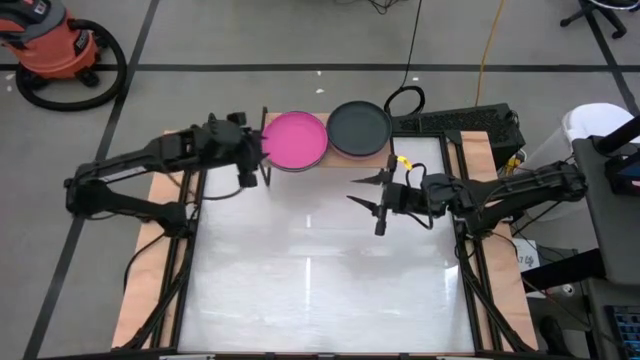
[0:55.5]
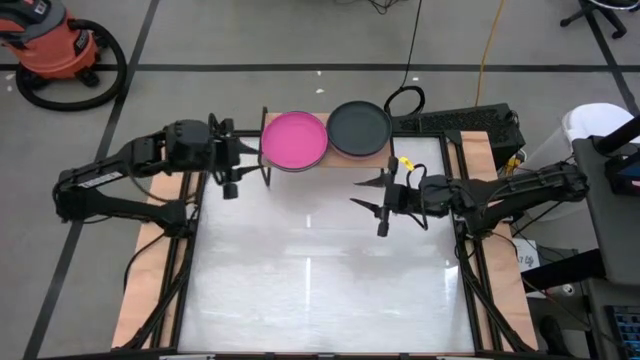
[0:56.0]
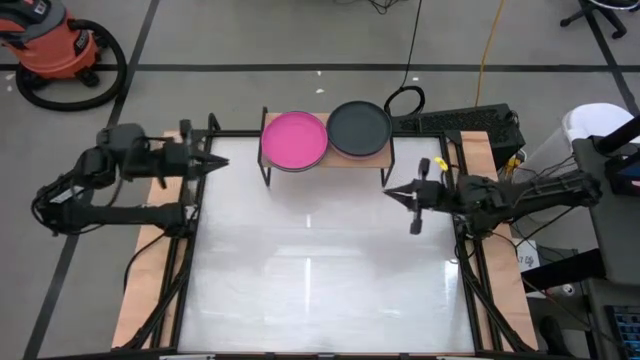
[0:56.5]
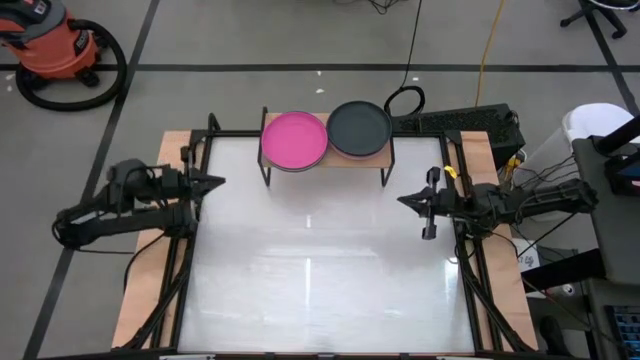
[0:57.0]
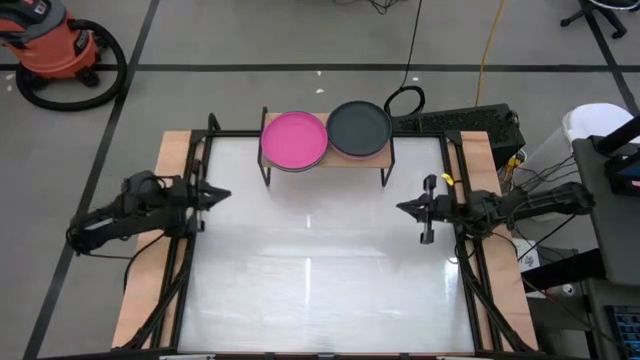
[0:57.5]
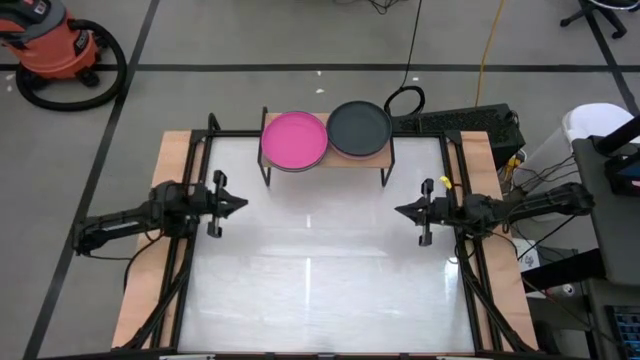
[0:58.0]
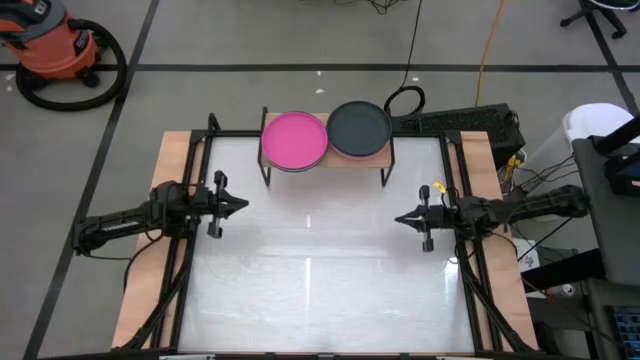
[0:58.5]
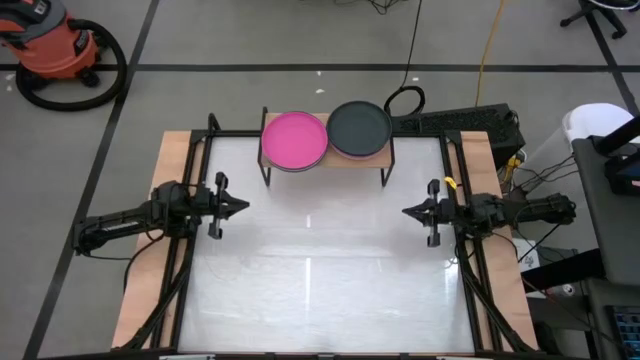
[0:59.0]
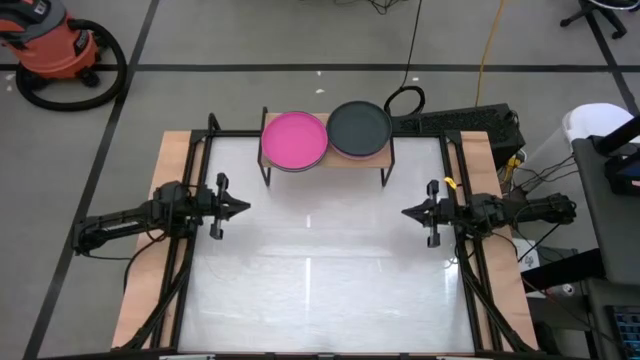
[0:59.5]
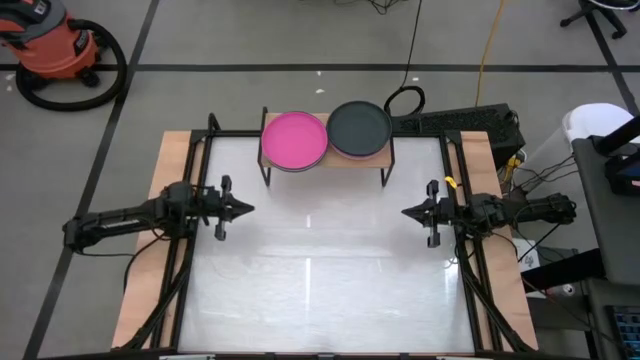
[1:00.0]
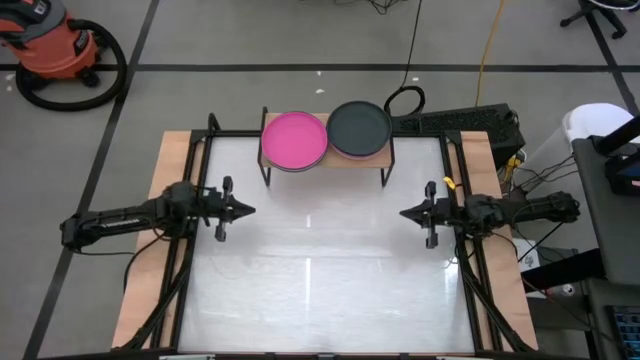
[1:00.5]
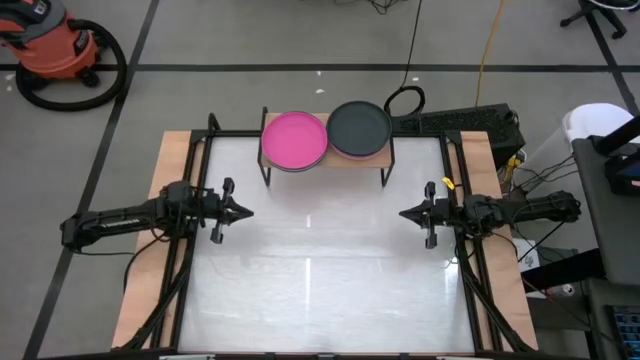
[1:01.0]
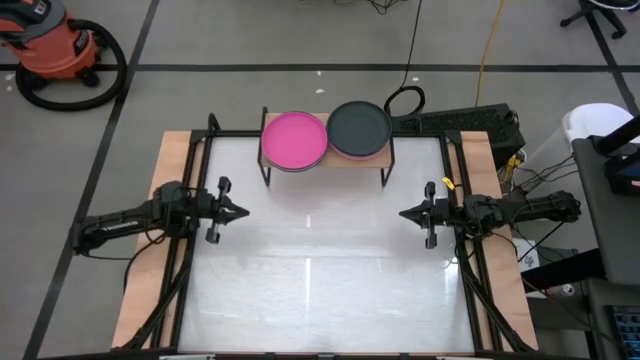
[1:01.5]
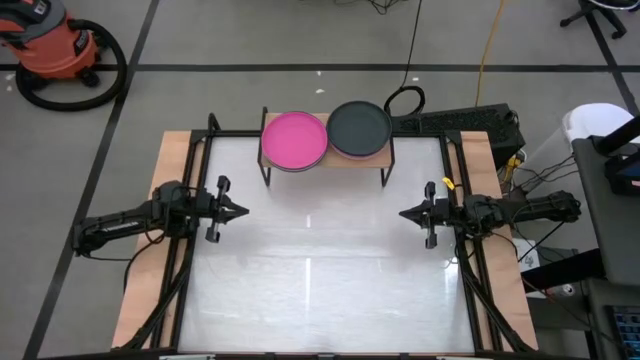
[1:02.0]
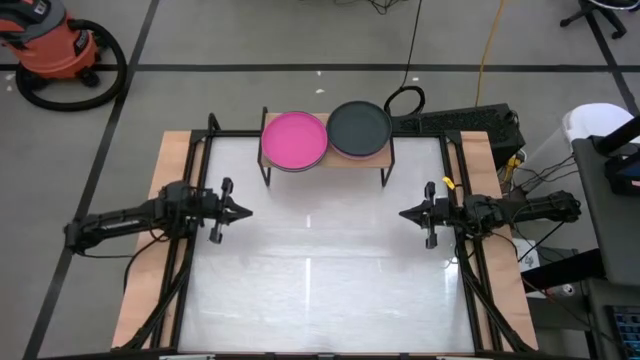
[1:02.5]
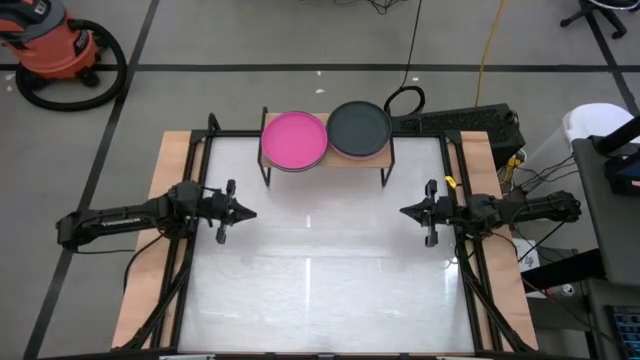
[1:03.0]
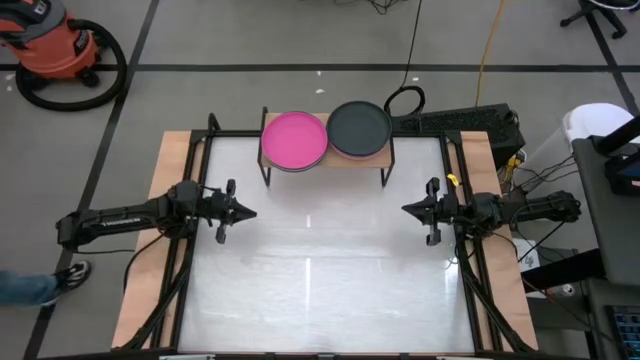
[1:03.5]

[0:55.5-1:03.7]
Task: Place and stack plates onto a shelf
Return to Home Position

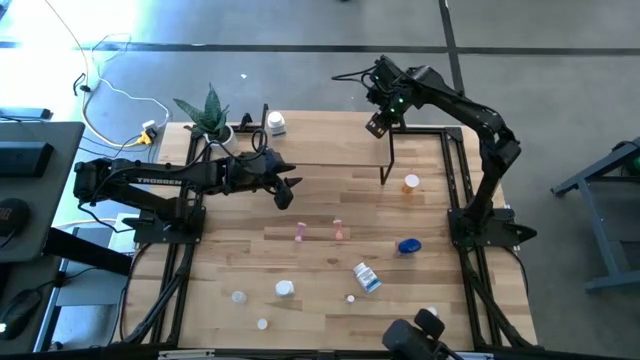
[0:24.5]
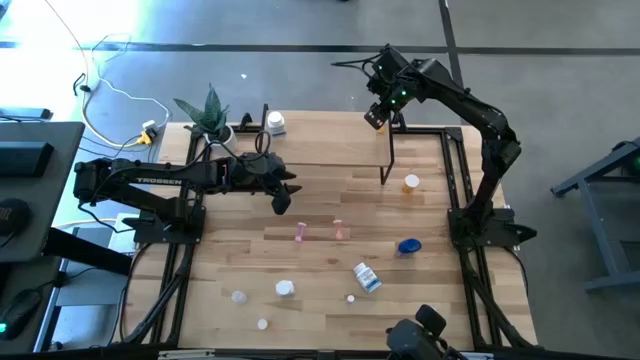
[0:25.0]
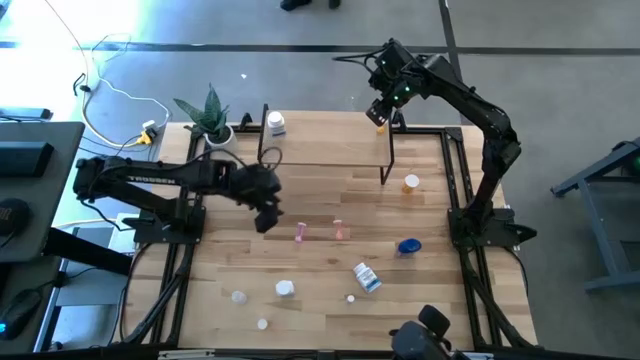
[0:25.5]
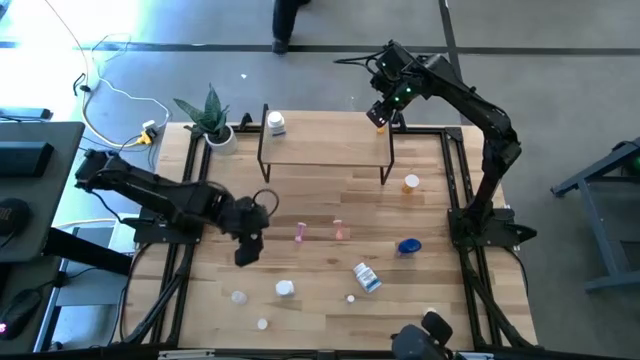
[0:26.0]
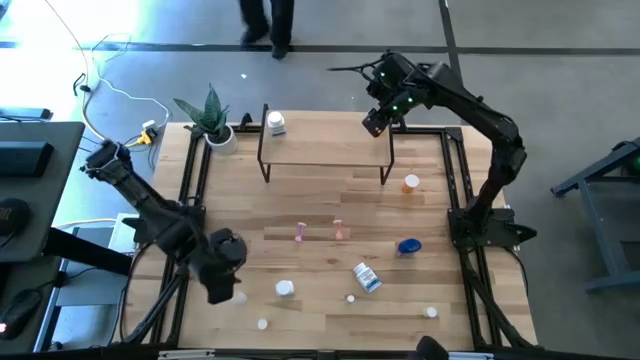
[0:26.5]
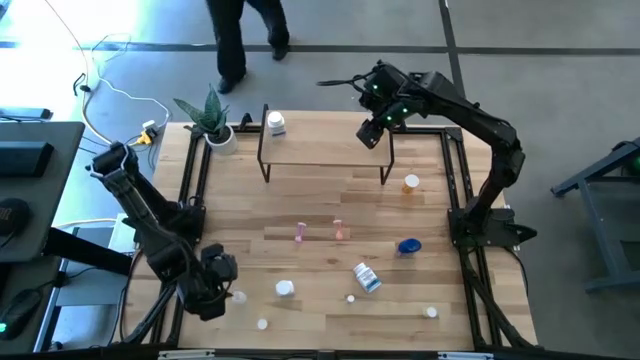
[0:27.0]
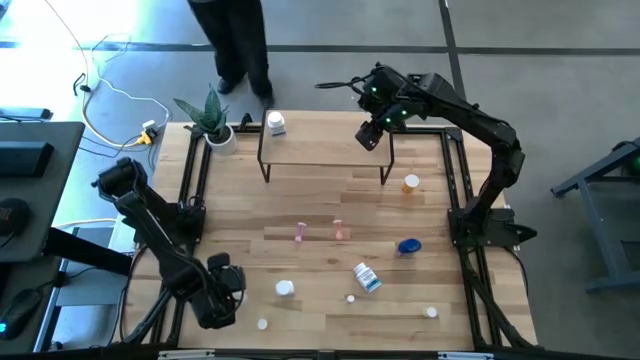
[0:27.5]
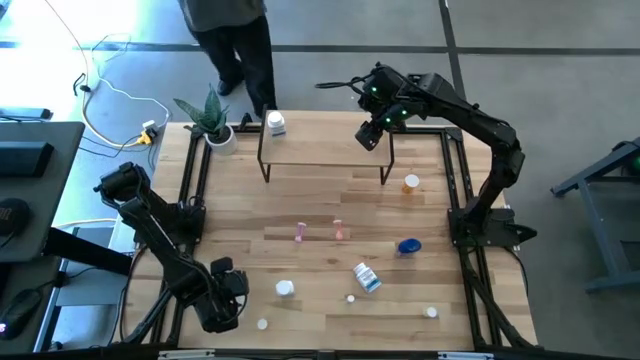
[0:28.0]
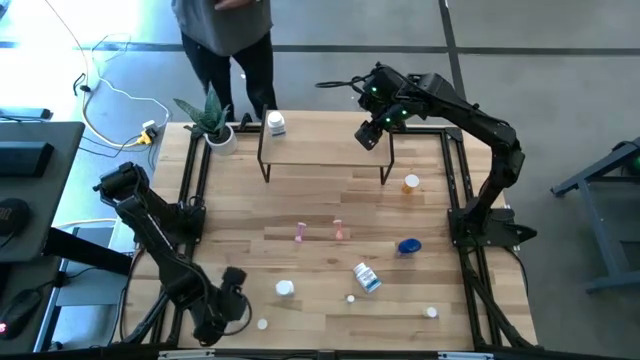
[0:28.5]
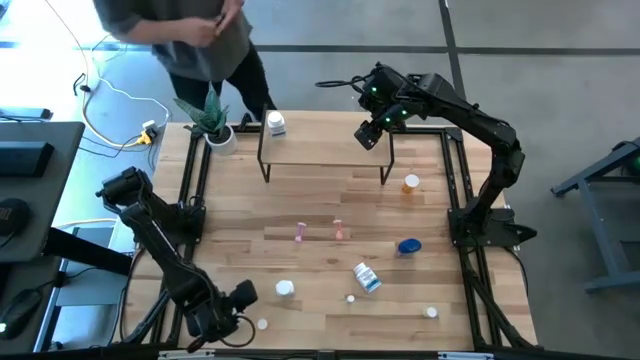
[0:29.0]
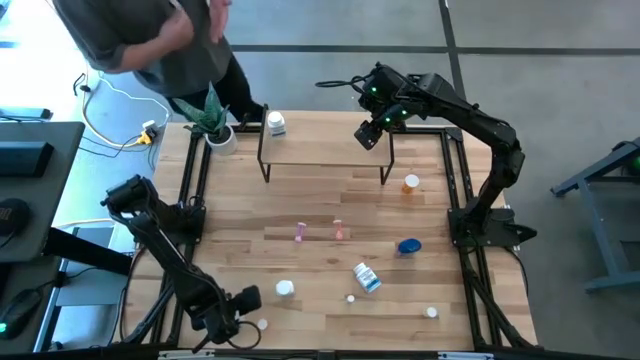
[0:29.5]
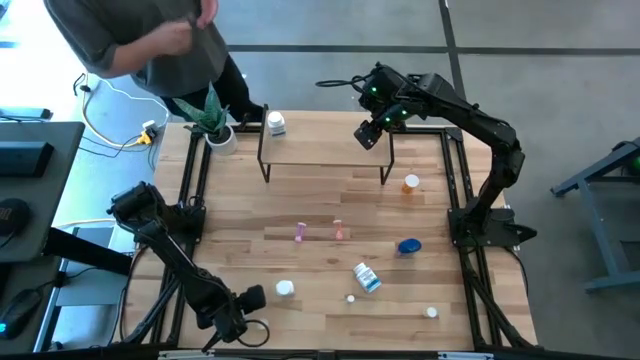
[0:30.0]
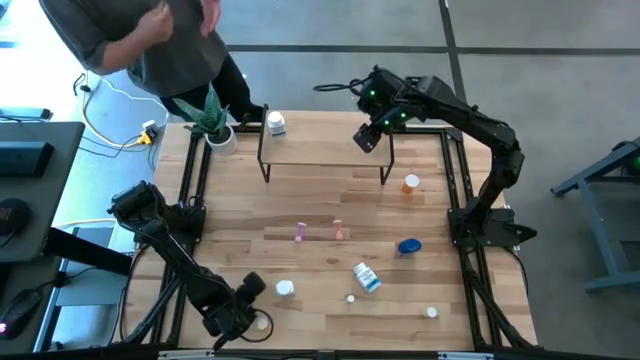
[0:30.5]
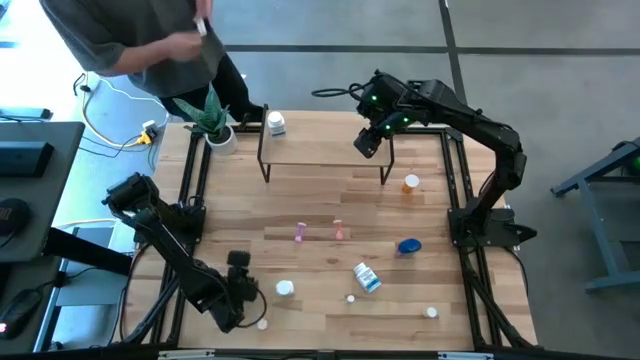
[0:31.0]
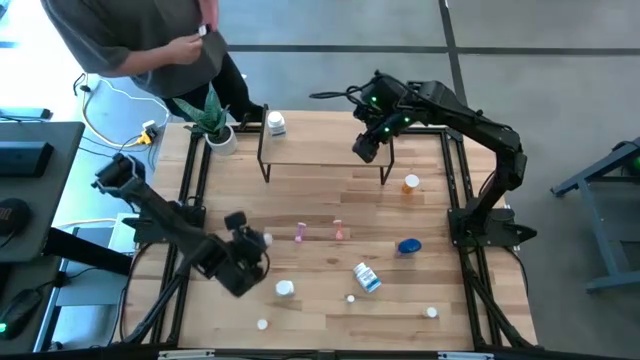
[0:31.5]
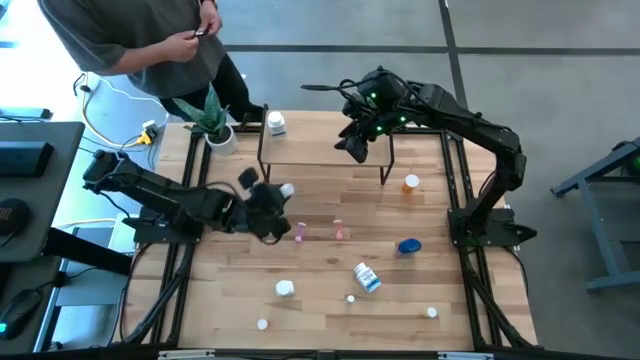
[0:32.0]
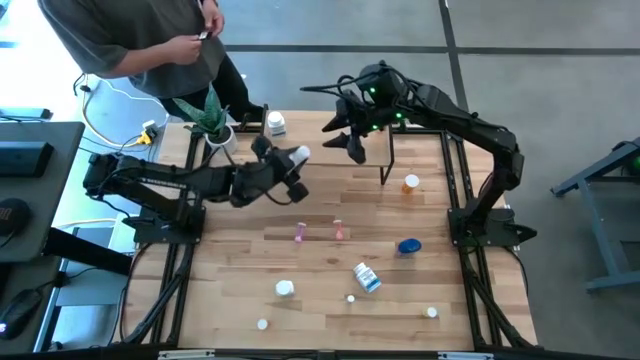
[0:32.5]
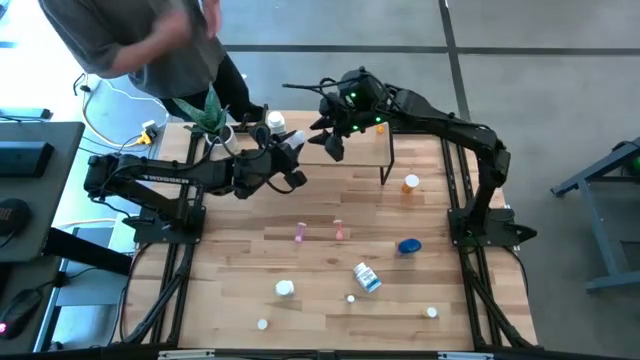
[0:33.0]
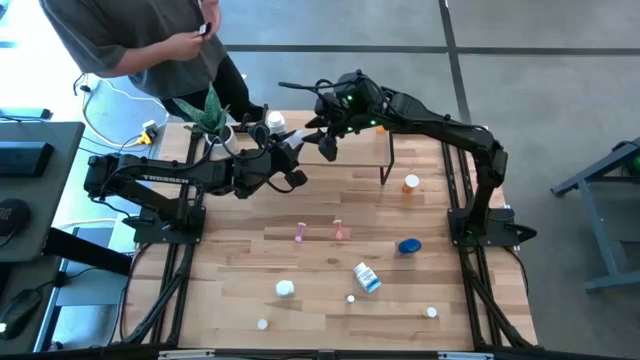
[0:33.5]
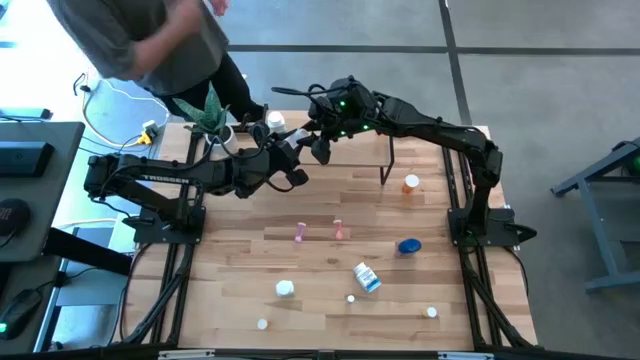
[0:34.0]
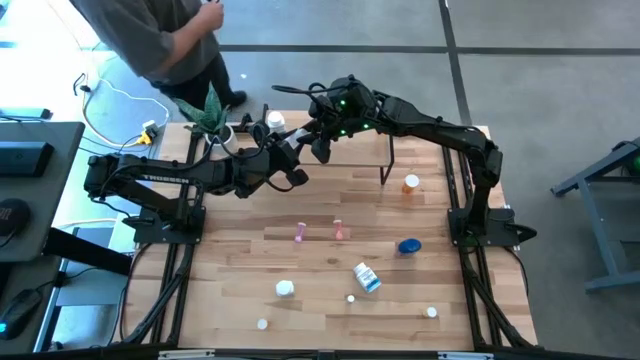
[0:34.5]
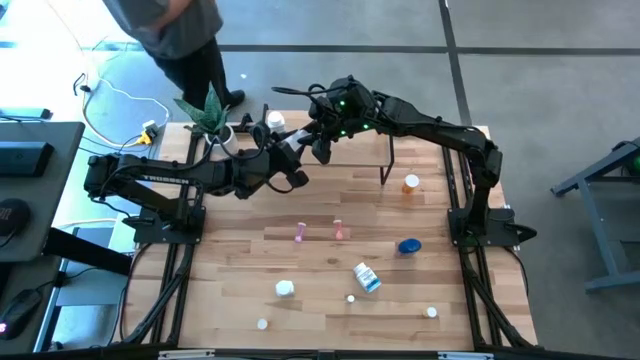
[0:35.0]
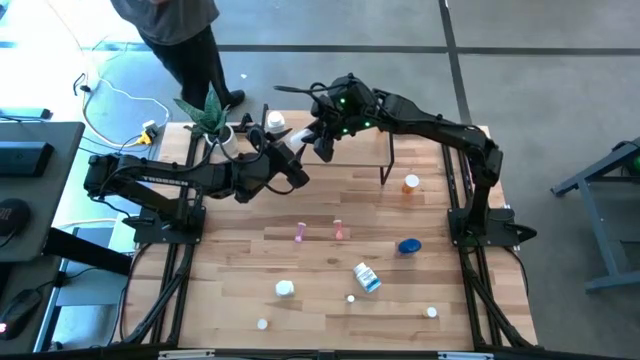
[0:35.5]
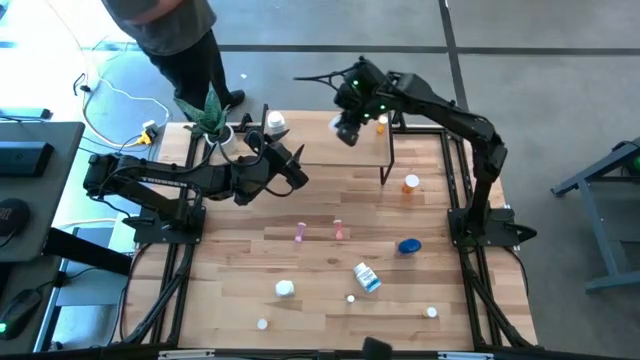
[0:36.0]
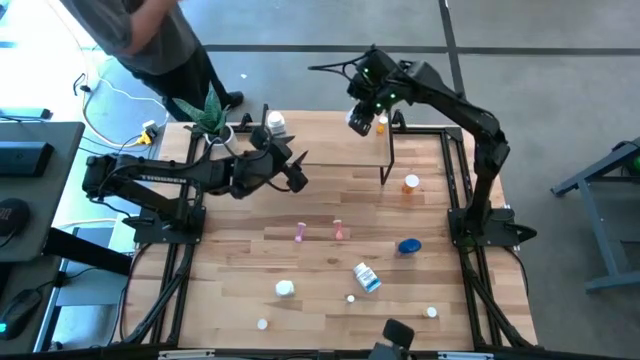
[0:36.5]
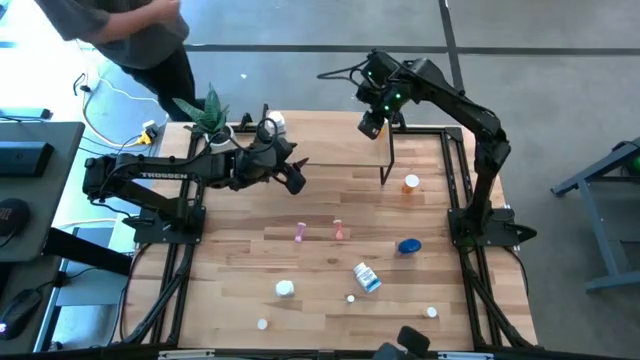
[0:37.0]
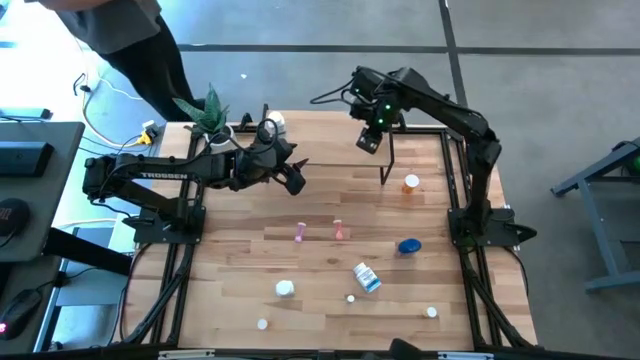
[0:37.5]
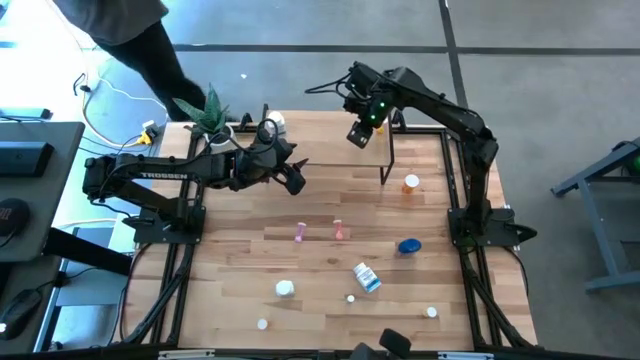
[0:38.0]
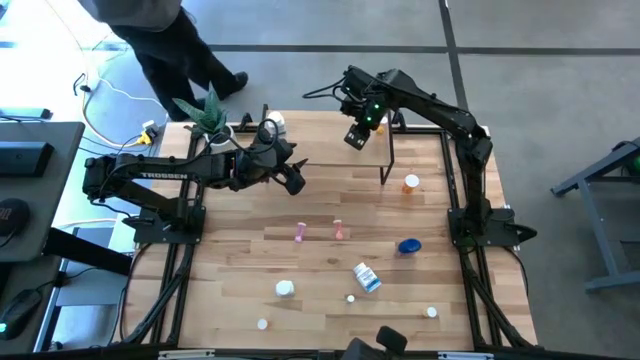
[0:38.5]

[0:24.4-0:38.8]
Task: Pick and place medicine bottles onto shelf by color
Put the white pill bottle on the shelf
